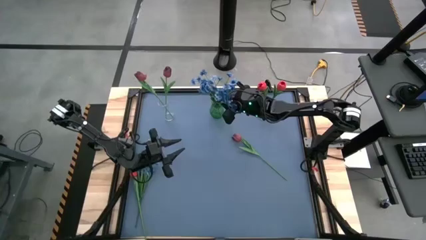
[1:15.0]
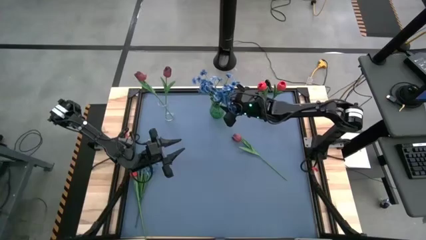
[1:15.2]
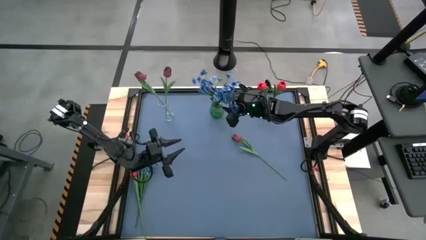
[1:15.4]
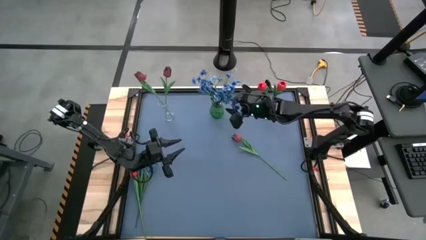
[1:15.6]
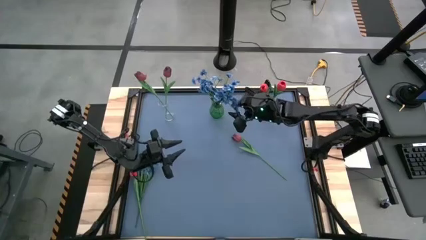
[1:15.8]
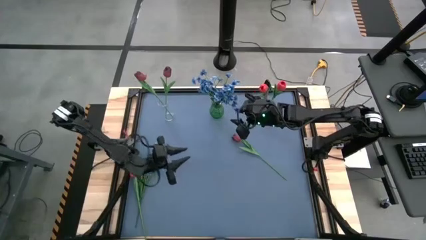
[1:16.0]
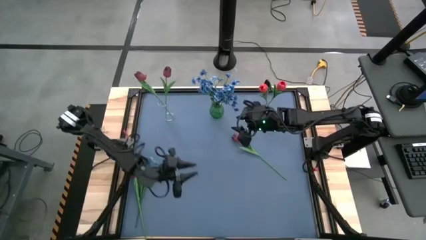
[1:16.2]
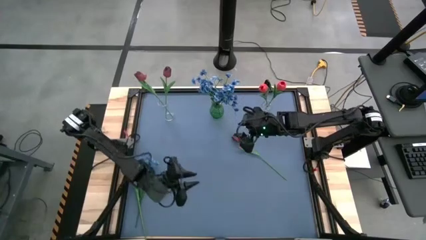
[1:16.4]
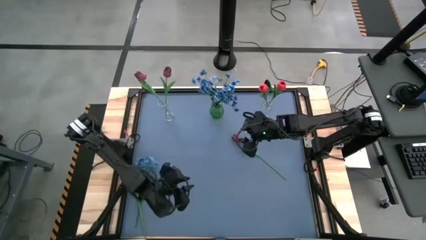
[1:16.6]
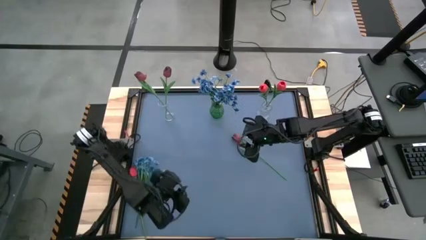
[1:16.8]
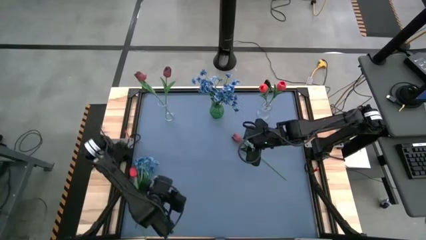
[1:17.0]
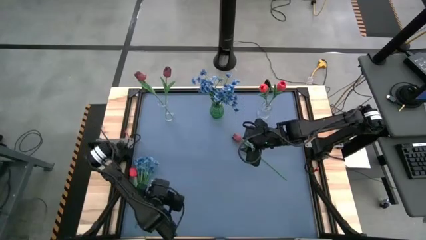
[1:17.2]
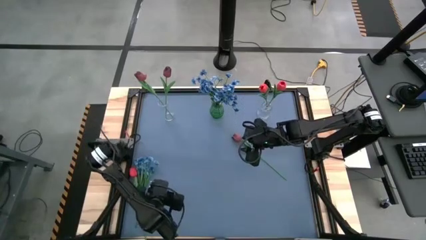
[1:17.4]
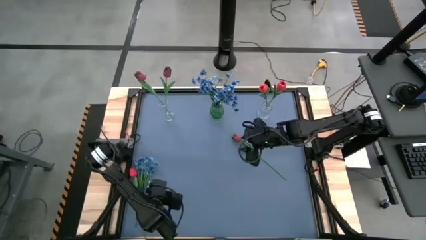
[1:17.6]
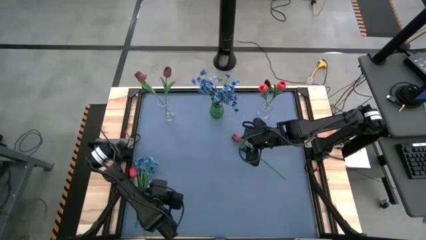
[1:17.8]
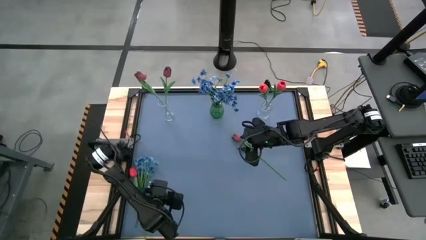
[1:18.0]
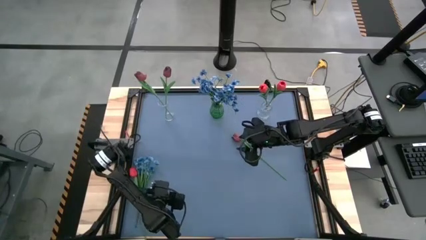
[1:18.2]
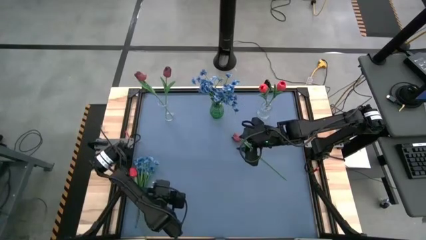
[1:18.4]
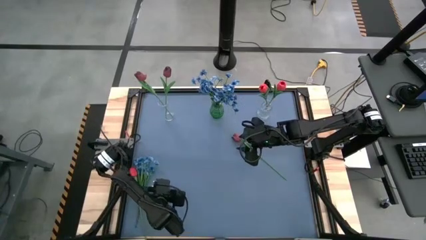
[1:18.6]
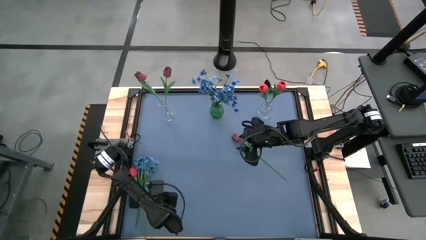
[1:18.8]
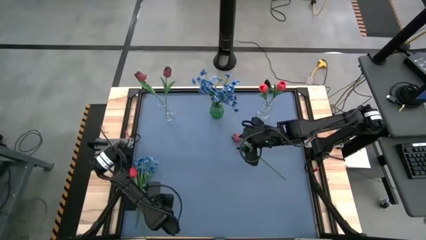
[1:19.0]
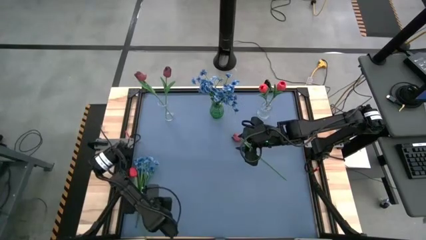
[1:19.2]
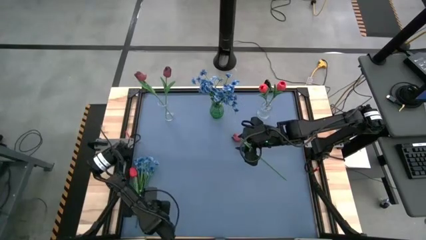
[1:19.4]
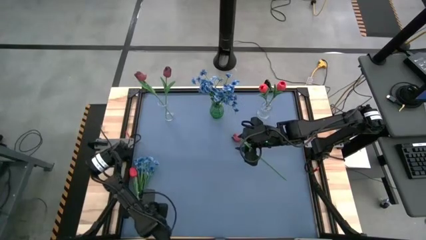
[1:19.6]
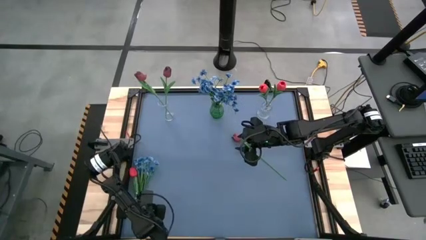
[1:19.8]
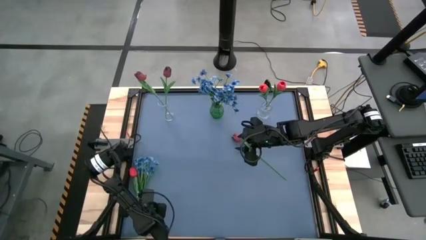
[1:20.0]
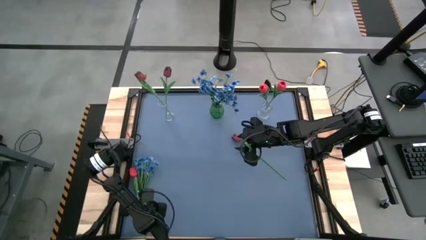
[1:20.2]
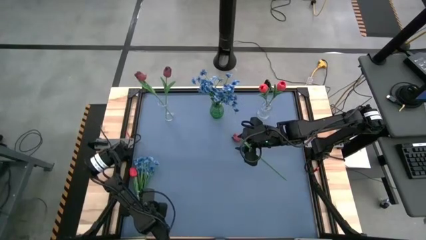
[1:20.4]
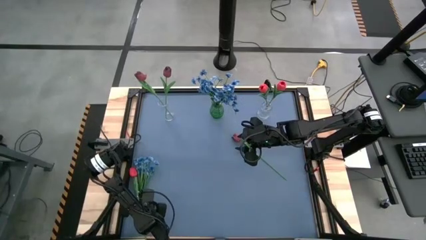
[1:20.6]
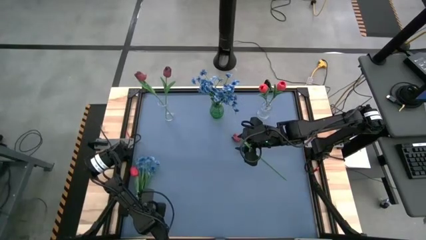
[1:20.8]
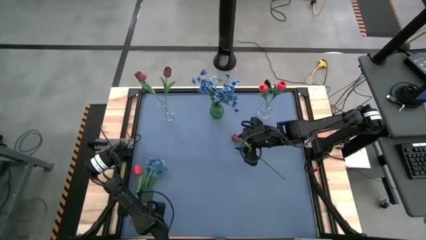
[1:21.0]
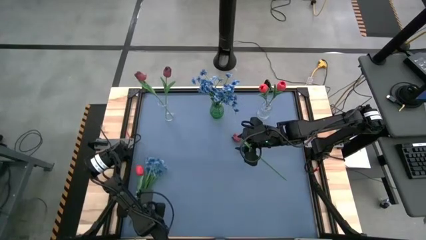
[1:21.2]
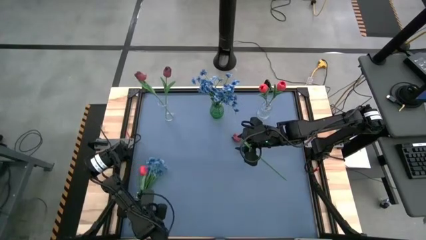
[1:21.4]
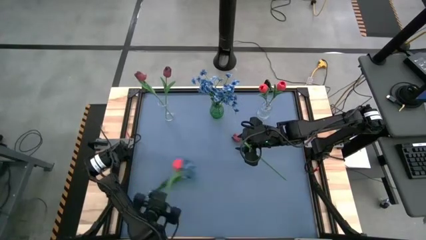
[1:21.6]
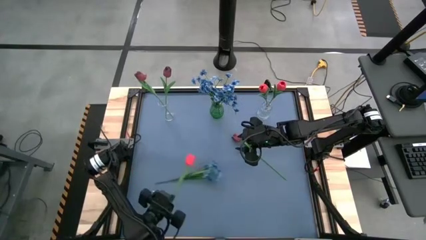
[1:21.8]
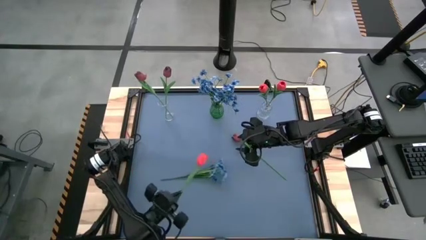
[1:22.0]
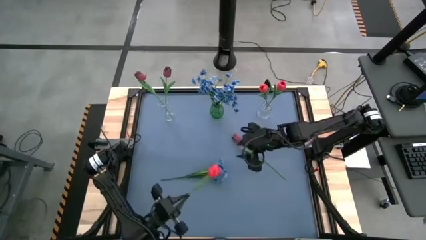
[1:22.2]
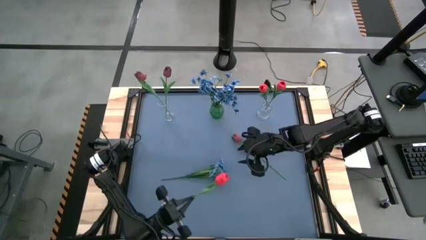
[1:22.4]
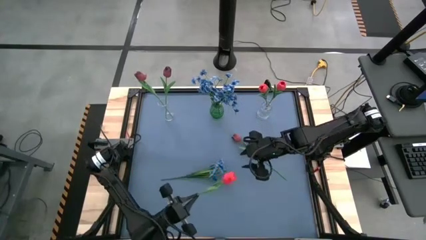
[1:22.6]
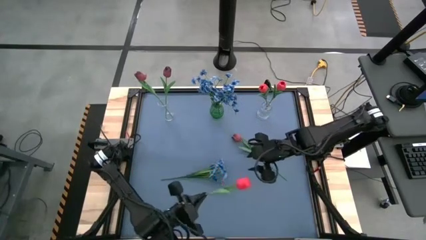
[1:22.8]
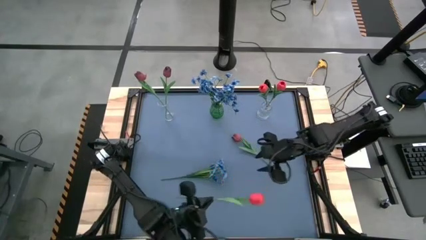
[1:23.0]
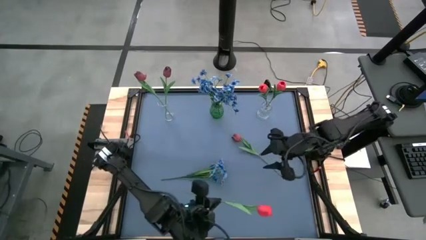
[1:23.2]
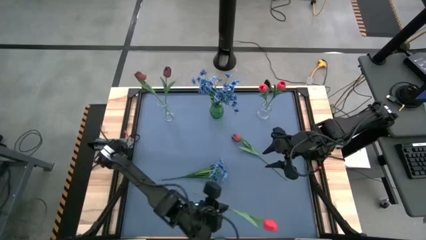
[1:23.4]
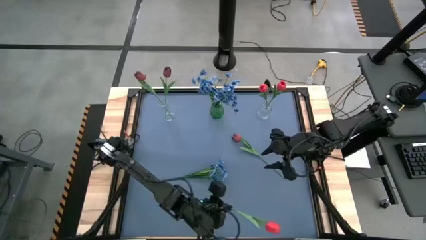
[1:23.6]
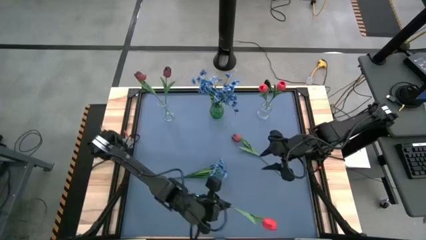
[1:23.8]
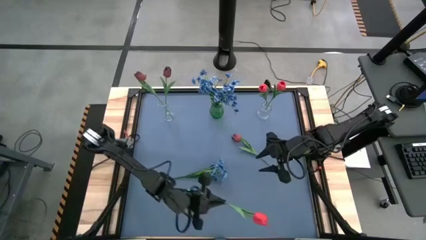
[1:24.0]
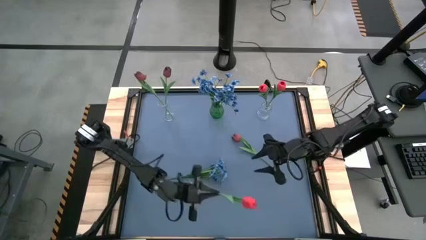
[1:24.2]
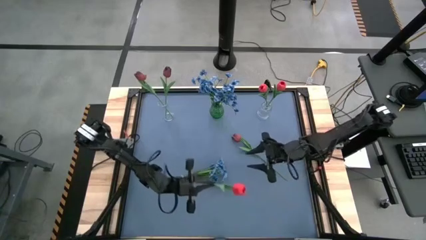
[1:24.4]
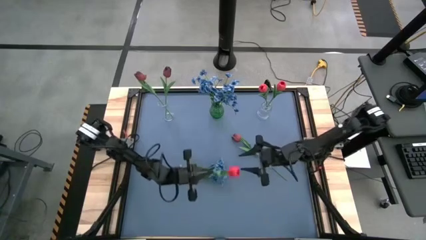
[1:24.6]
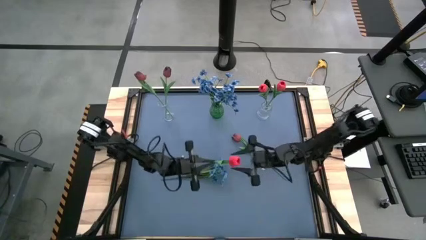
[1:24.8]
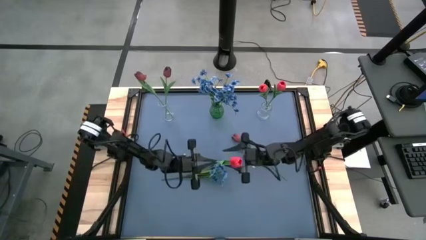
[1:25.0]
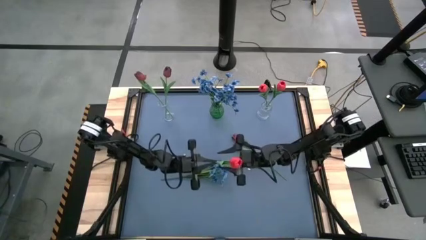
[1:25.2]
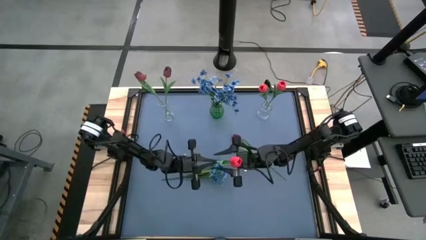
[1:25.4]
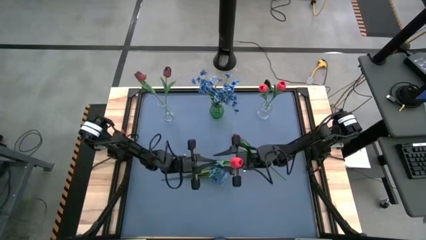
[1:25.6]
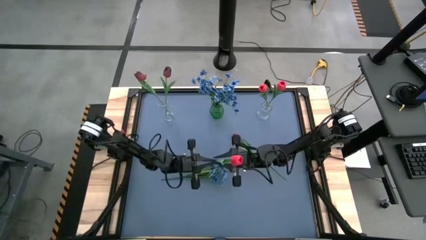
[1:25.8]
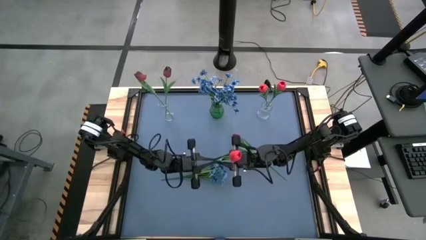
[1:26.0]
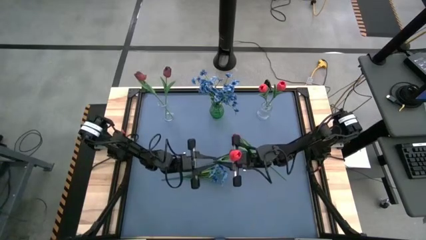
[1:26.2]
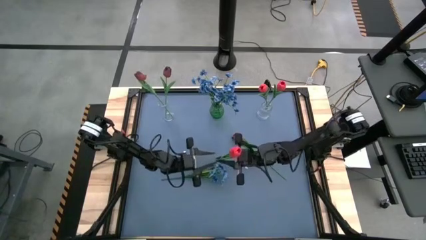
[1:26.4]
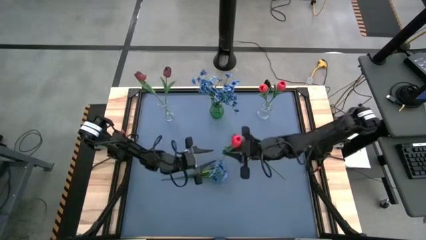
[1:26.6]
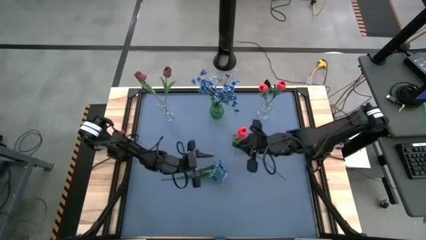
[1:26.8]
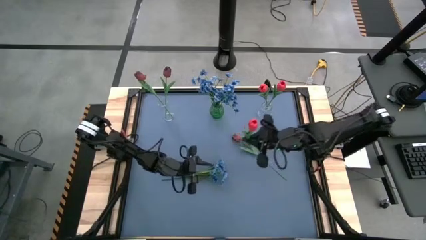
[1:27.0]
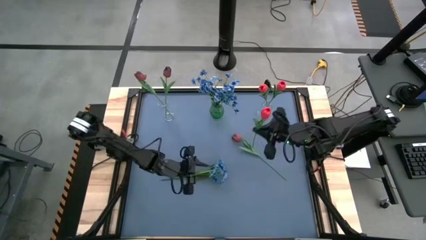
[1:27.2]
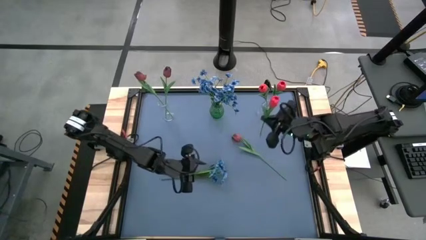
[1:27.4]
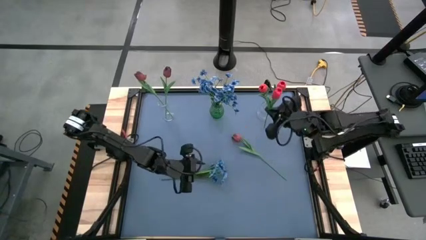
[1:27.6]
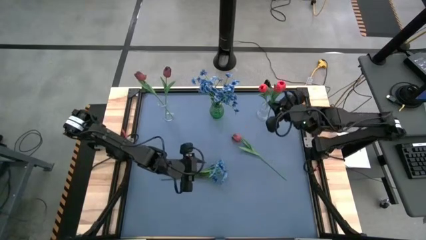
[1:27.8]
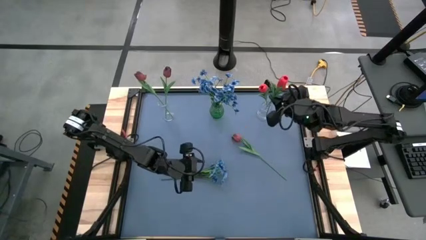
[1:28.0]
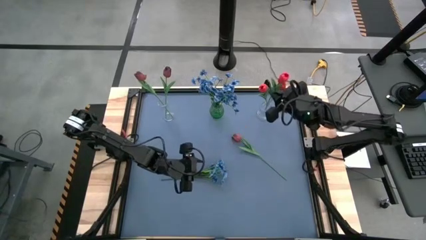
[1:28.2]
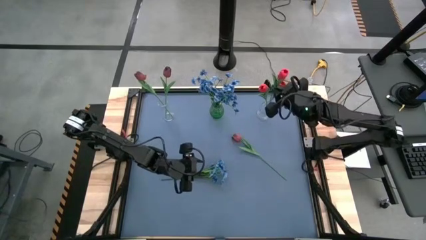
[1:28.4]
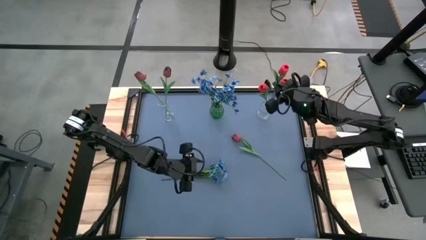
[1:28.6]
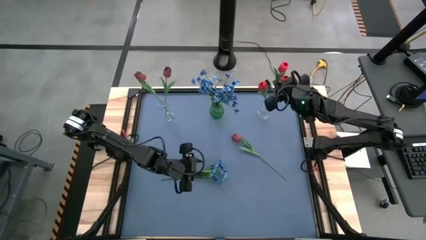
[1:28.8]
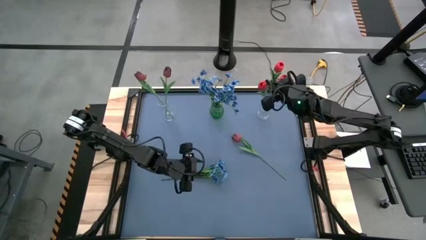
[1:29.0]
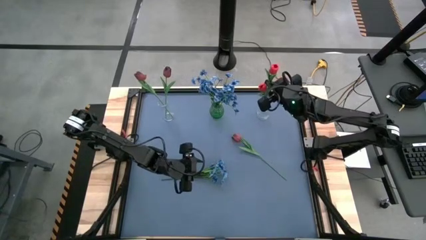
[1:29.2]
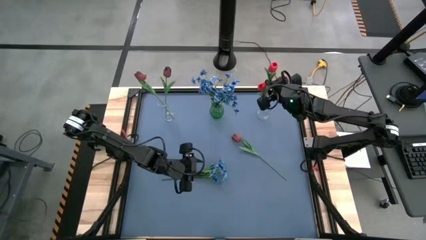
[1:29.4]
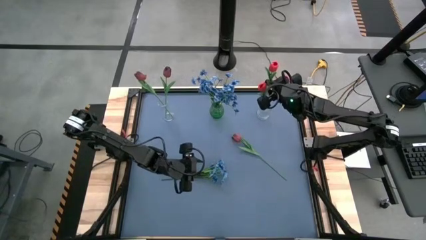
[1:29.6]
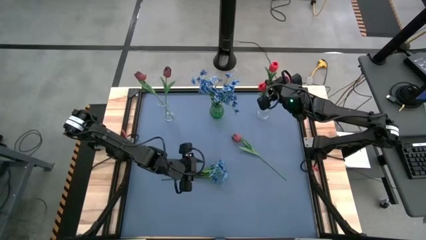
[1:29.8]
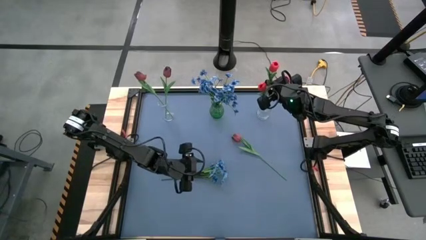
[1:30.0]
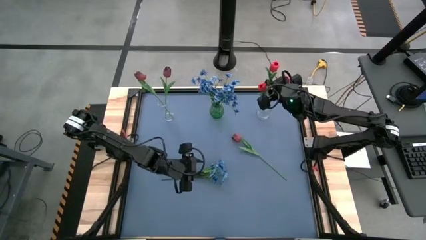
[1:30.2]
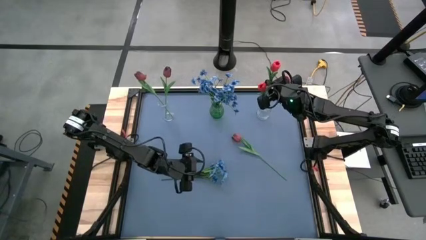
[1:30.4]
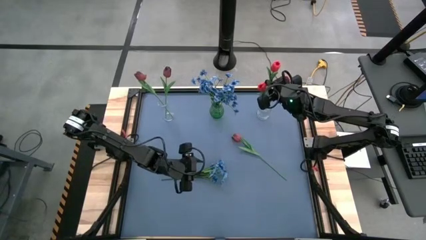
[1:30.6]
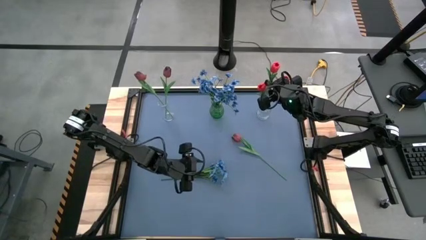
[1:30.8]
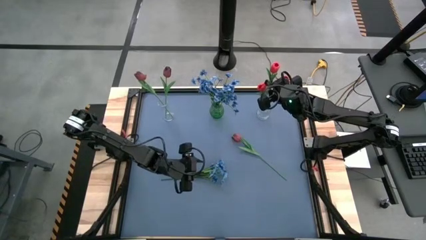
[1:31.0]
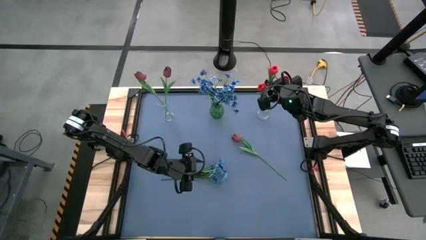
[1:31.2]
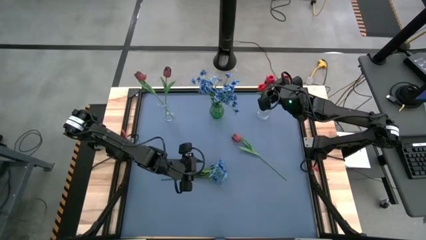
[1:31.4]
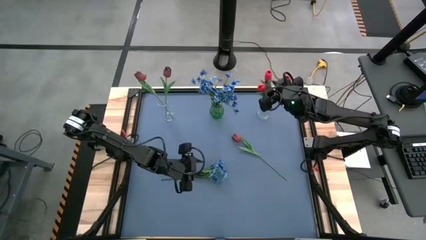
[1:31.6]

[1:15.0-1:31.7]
Task: Sort flowers into vase by color
Put the pink flower into the right transparent vase
